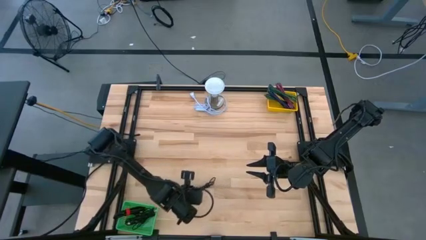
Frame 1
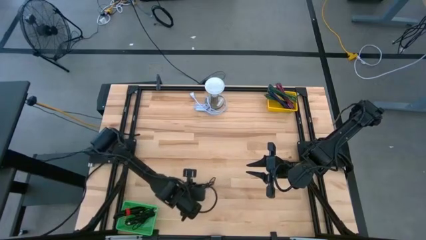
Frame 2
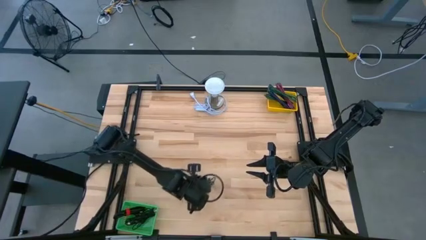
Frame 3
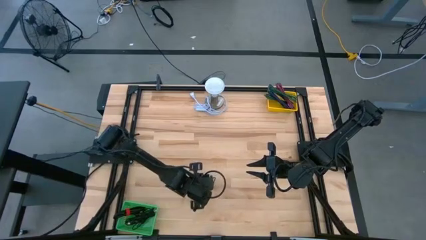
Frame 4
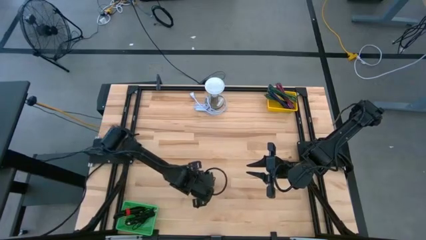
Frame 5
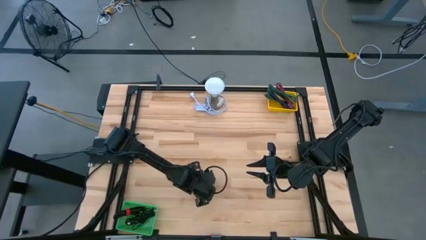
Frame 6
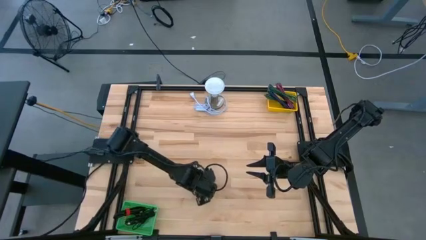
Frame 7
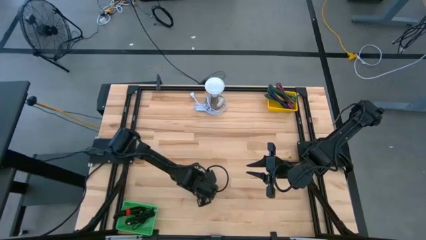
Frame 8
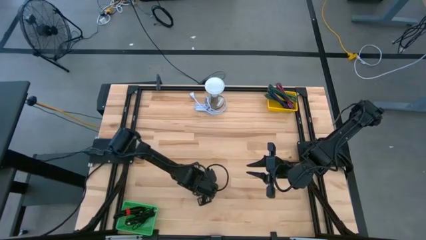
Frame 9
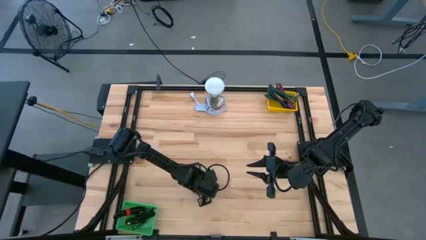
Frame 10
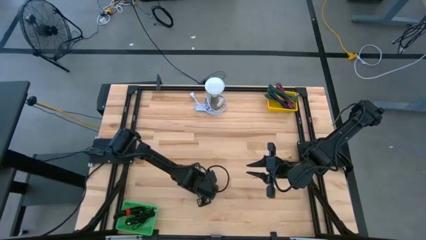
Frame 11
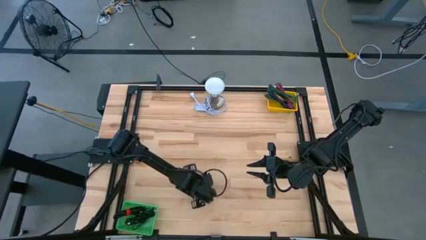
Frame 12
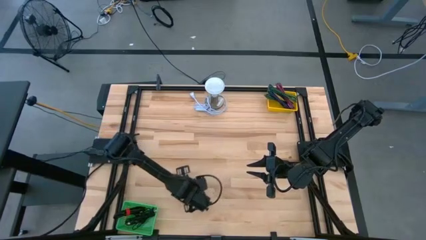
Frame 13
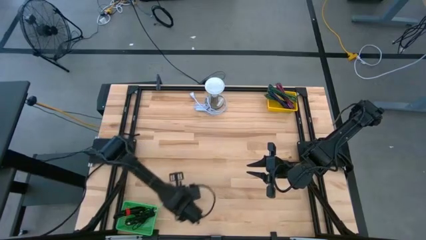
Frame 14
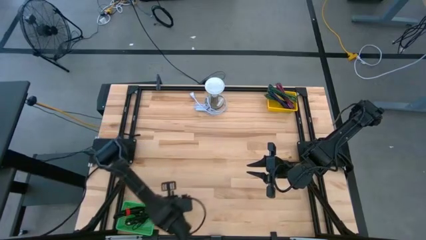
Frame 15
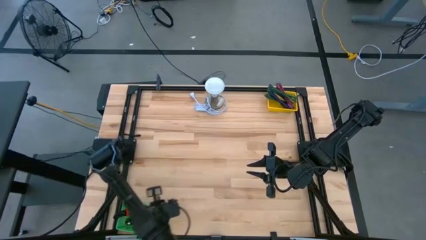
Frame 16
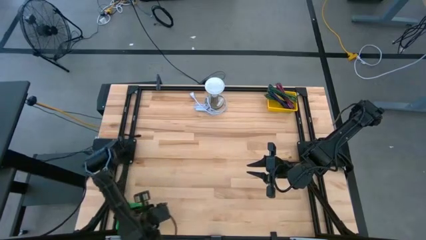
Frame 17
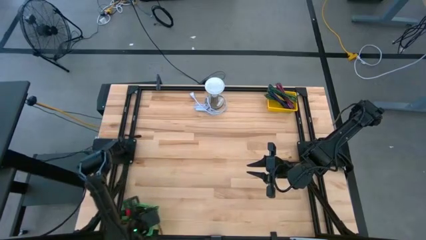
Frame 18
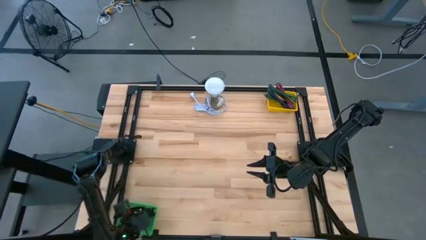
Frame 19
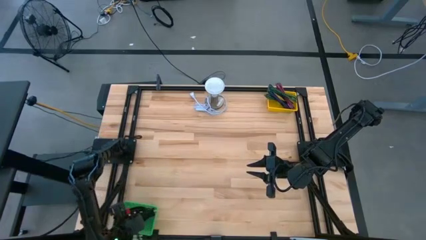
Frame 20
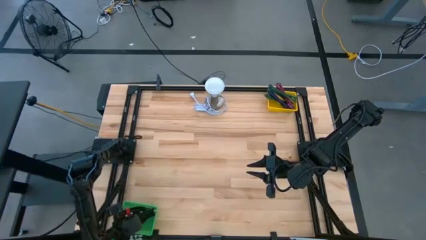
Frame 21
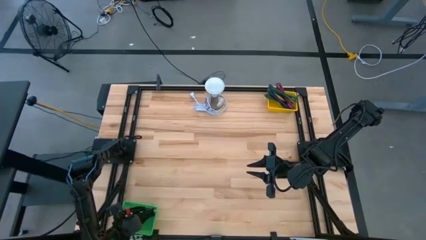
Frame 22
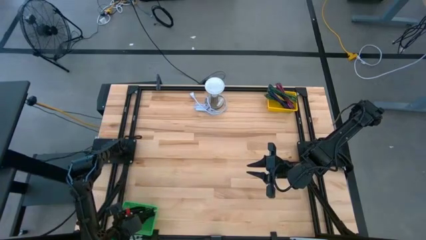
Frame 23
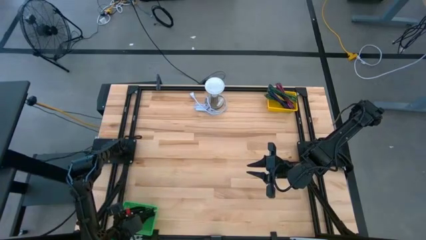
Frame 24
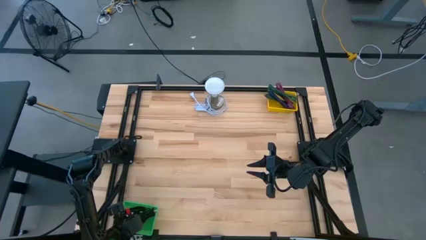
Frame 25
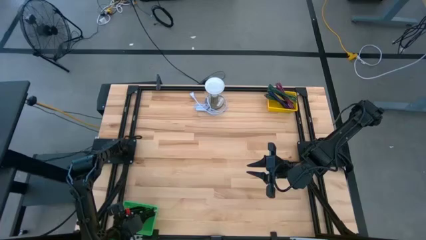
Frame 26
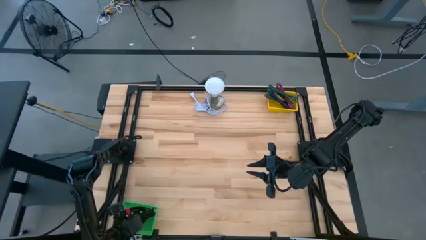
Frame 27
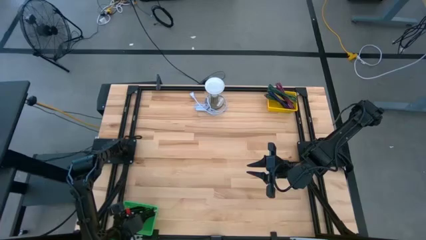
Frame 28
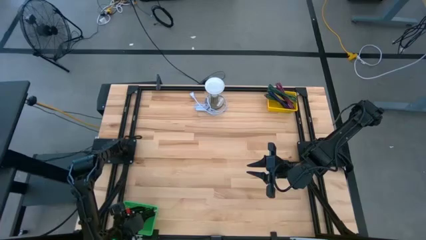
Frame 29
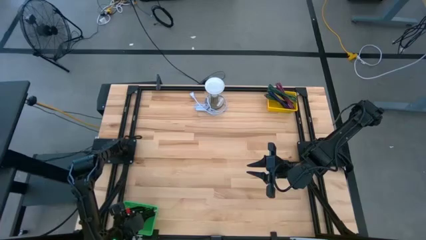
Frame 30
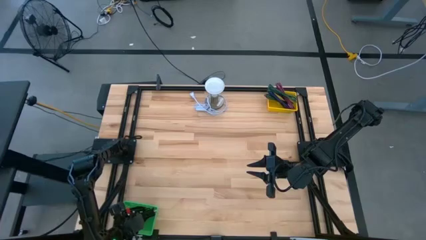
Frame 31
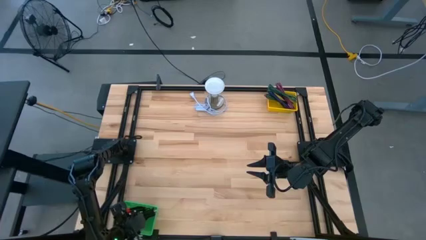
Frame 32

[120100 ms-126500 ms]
Task: Pick & Place USB Port
Put the black USB cable into the green bin
